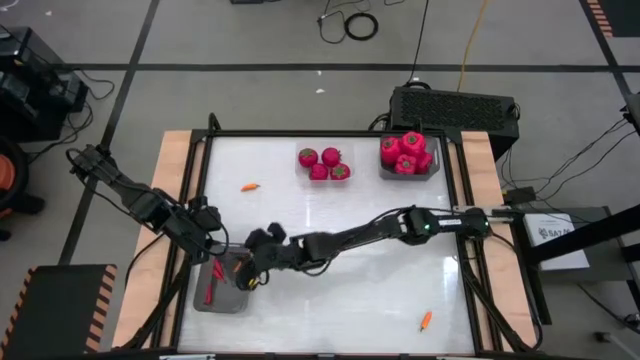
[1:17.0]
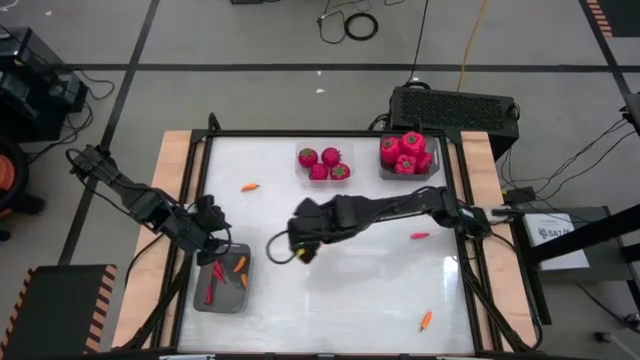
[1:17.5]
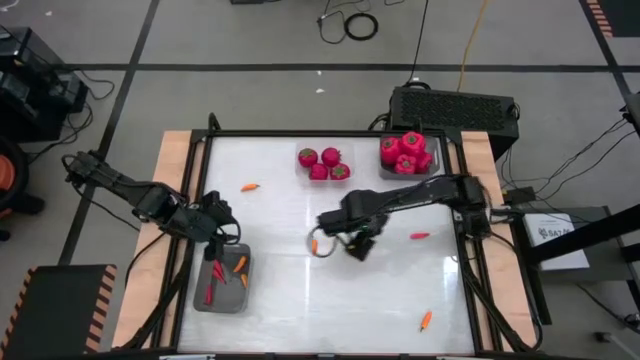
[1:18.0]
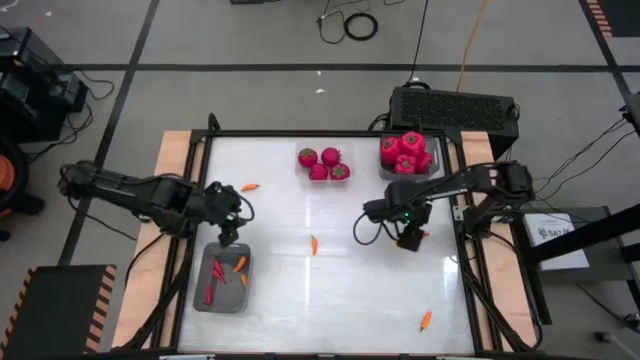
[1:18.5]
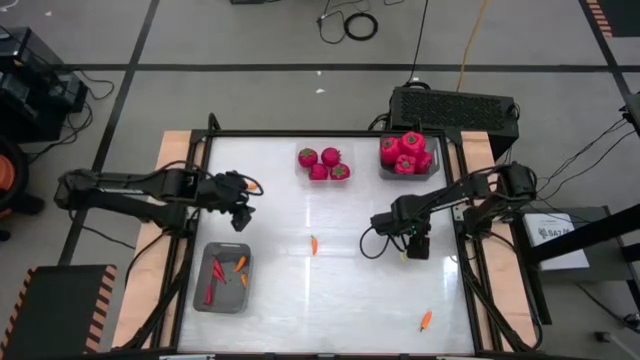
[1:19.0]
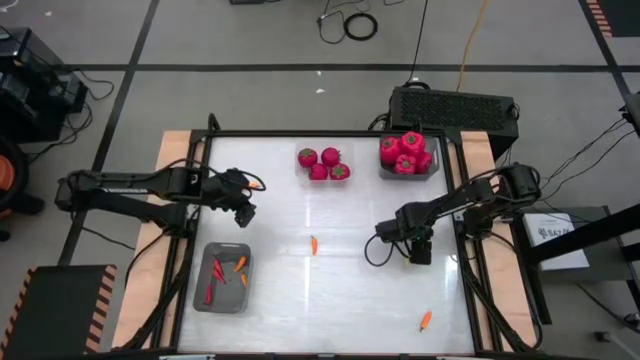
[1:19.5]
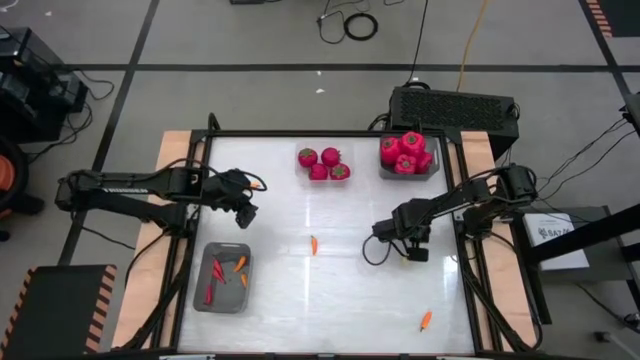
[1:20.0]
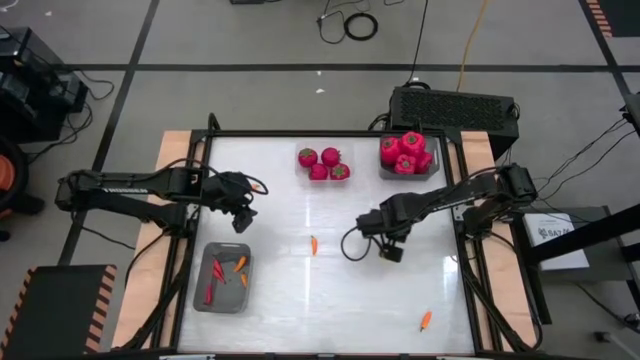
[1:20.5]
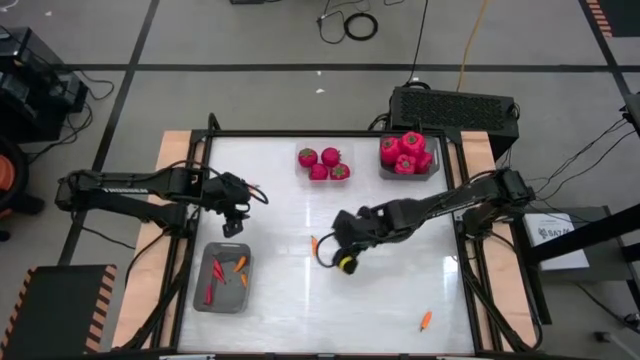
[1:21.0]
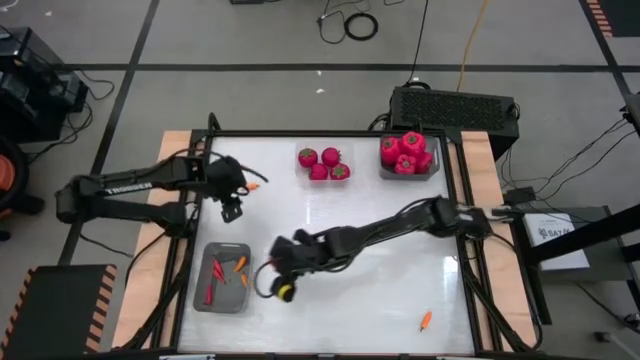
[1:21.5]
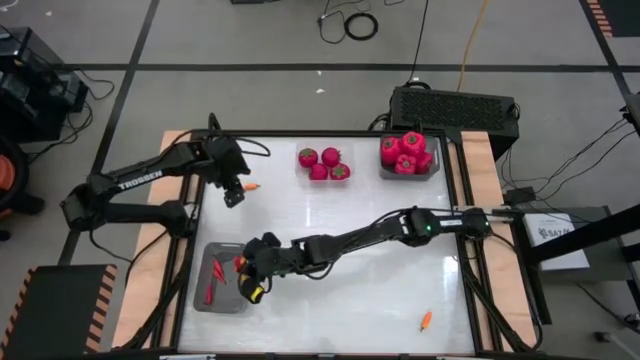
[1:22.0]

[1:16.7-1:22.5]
Task: Sort produce into baskets
Put the orange chili into the bottom gray bin

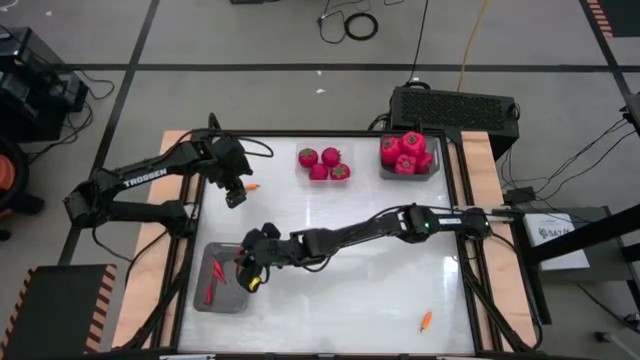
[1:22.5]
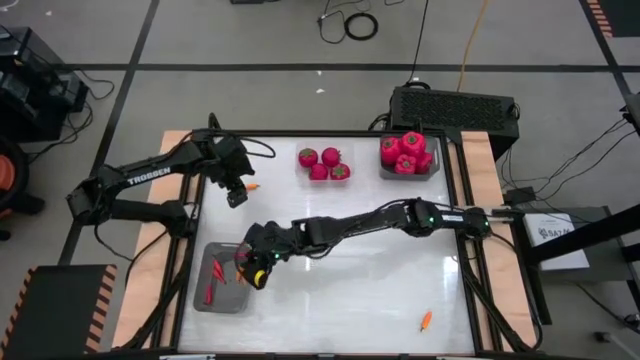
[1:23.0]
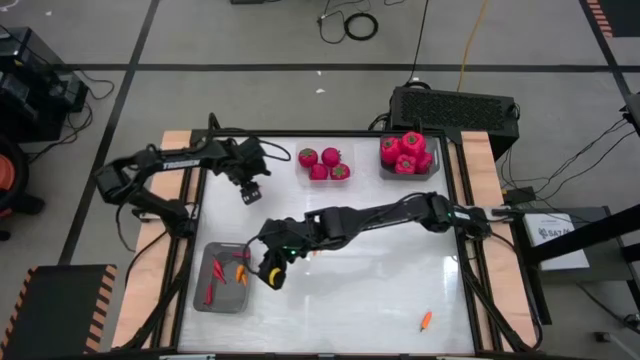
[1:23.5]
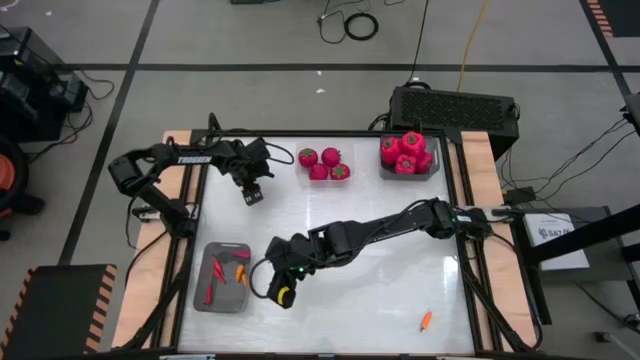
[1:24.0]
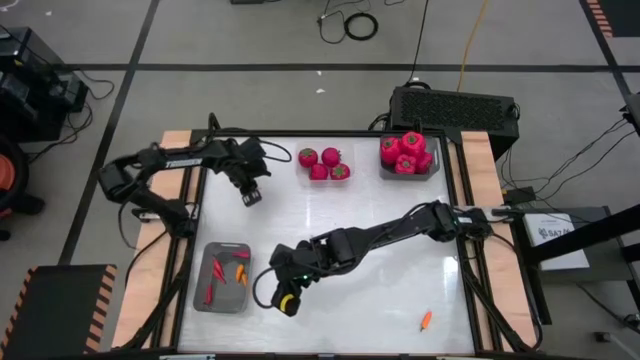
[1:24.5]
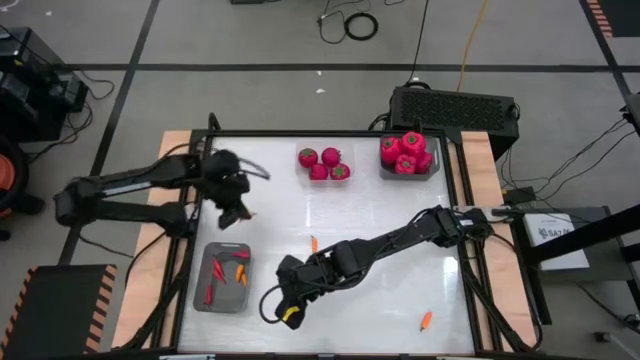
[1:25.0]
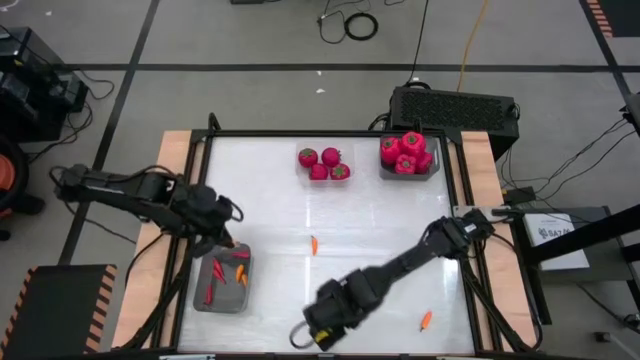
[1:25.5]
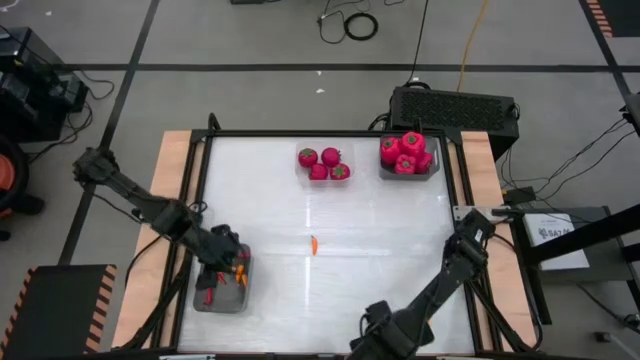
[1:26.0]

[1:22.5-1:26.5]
Put the yellow chili into the bottom gray bin

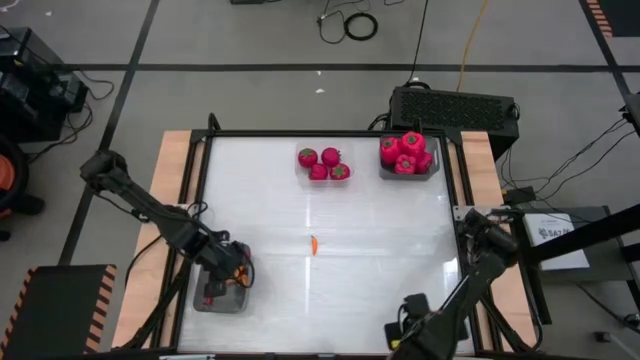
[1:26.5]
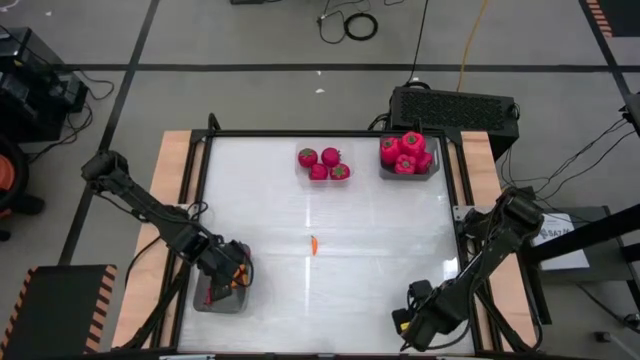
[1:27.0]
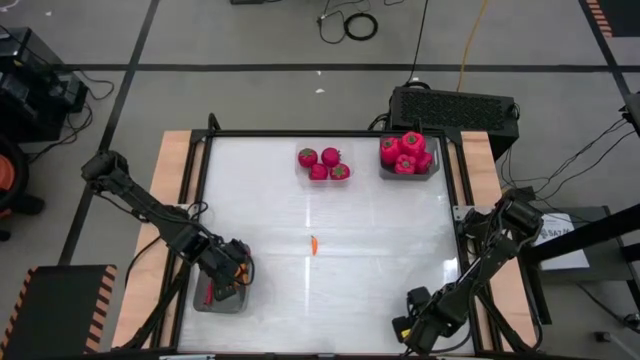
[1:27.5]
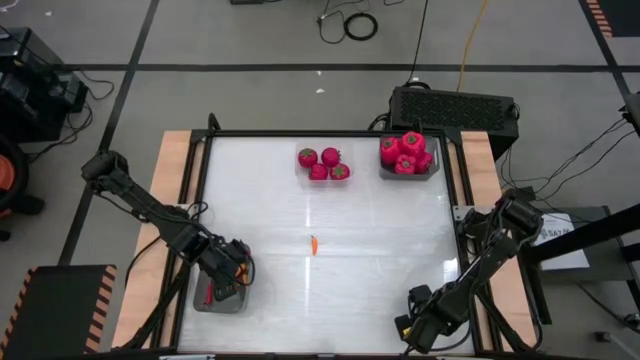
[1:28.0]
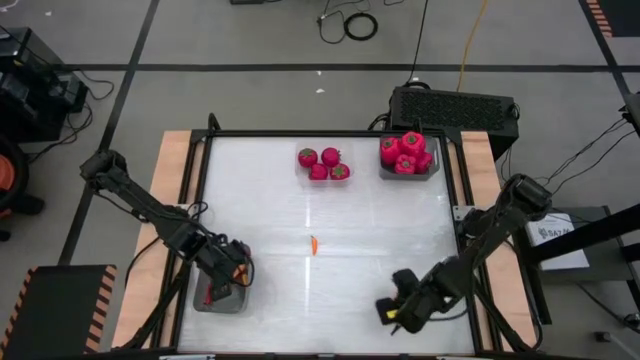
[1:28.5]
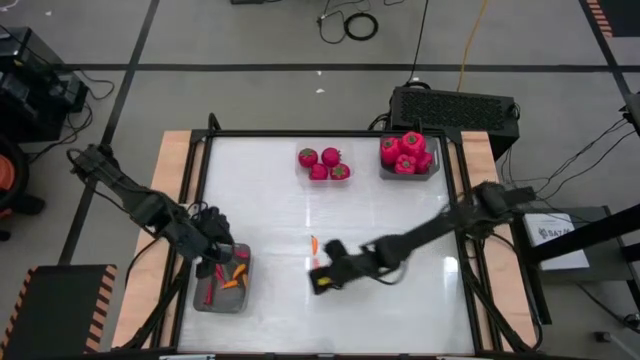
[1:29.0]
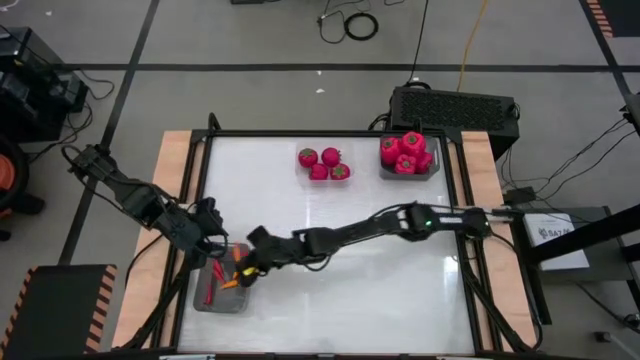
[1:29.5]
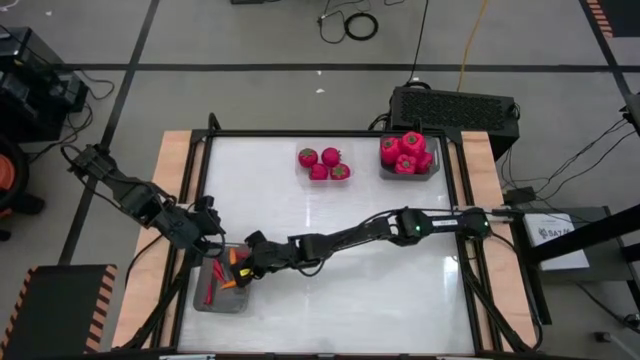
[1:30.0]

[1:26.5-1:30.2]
Put the yellow chili into the bottom gray bin

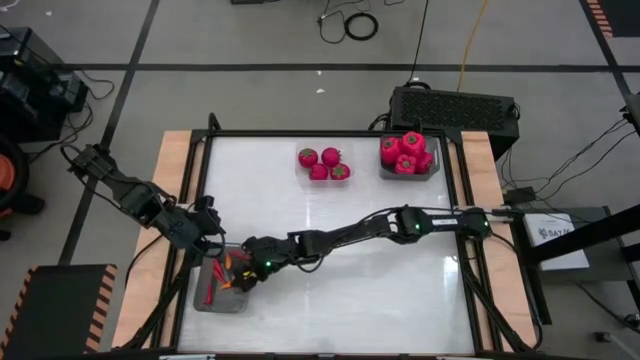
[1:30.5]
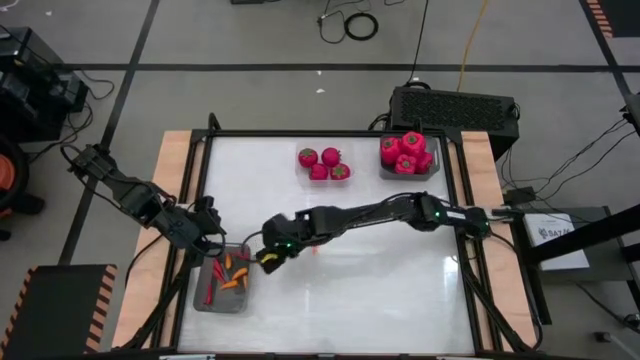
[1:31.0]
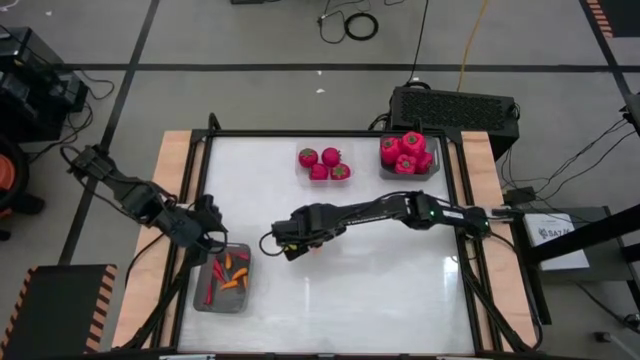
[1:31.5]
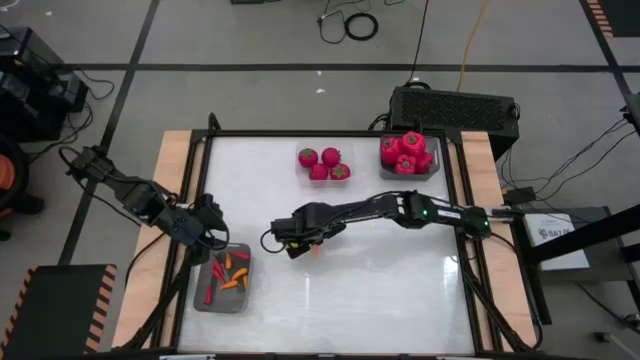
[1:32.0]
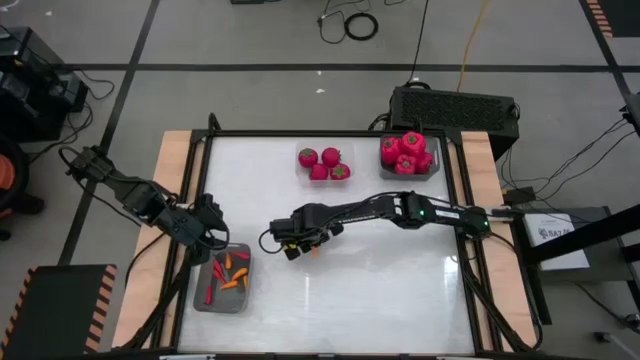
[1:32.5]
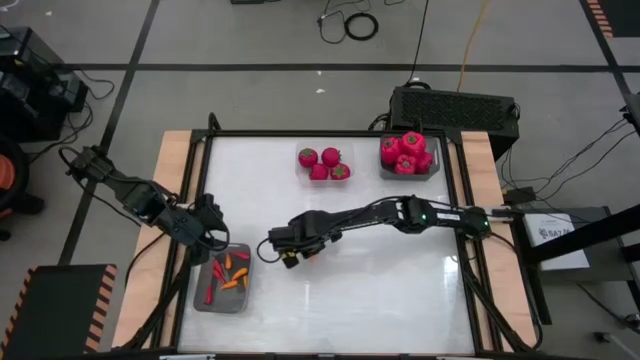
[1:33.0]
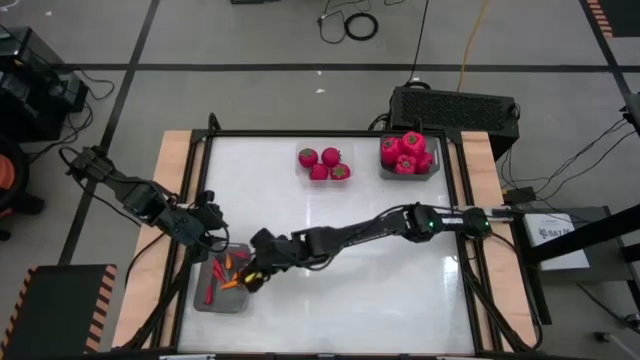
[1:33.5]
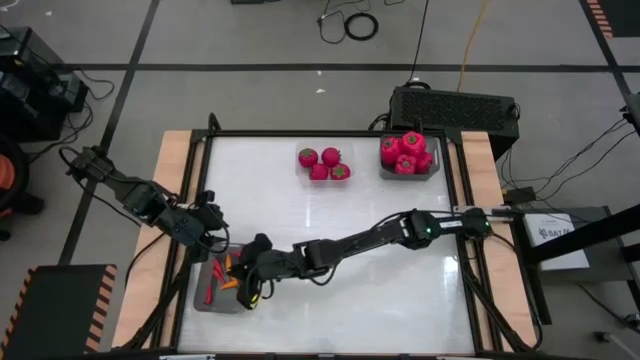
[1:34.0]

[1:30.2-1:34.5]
Put the yellow chili into the bottom gray bin

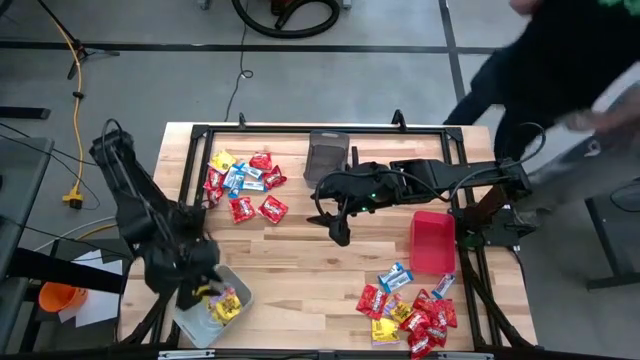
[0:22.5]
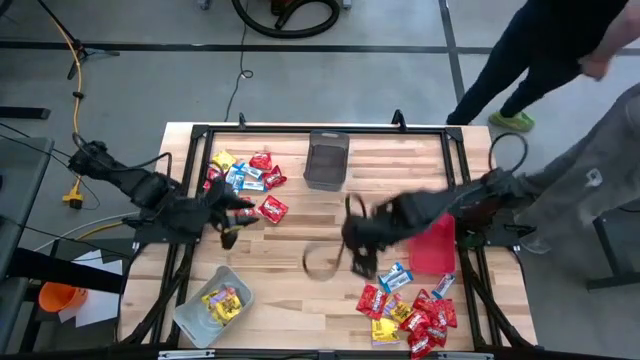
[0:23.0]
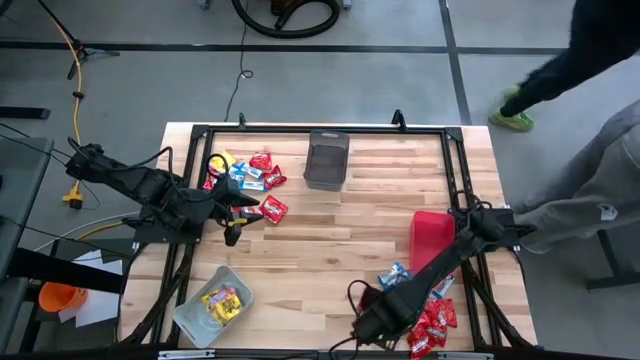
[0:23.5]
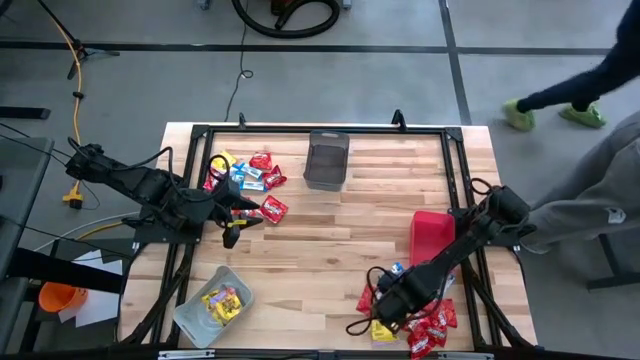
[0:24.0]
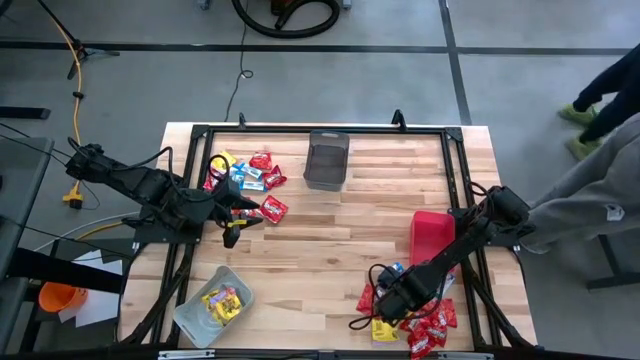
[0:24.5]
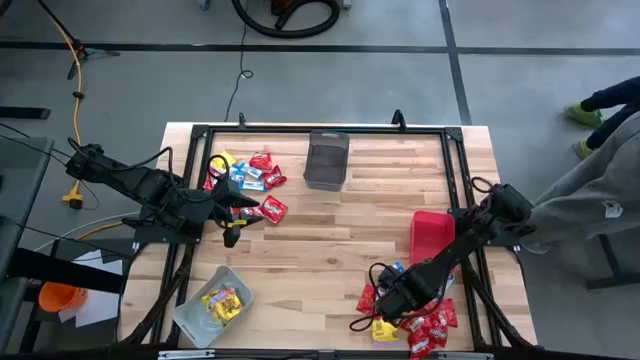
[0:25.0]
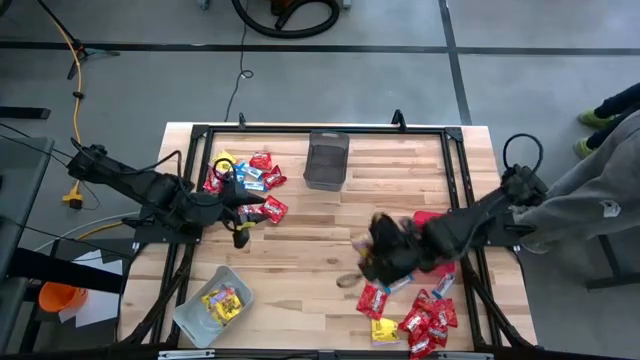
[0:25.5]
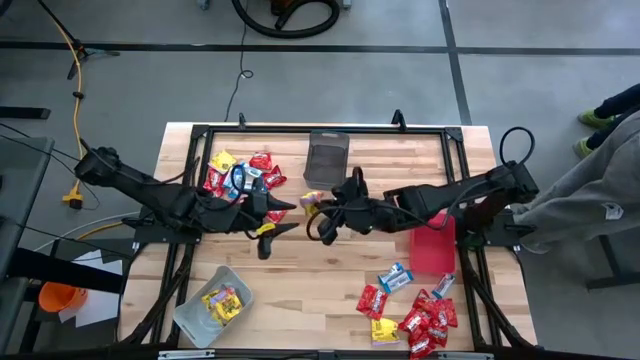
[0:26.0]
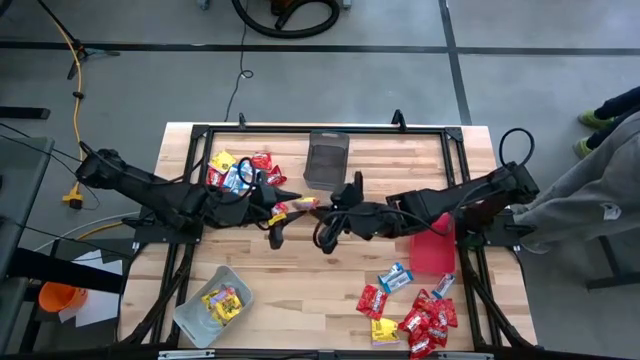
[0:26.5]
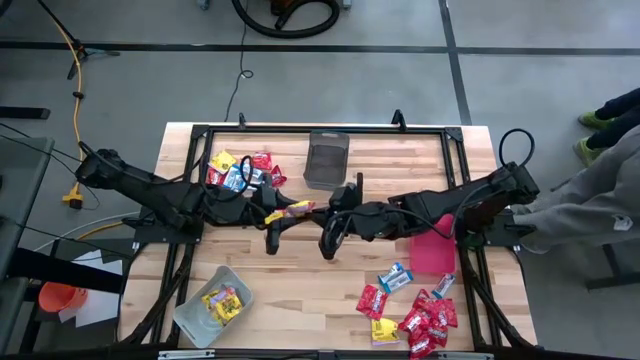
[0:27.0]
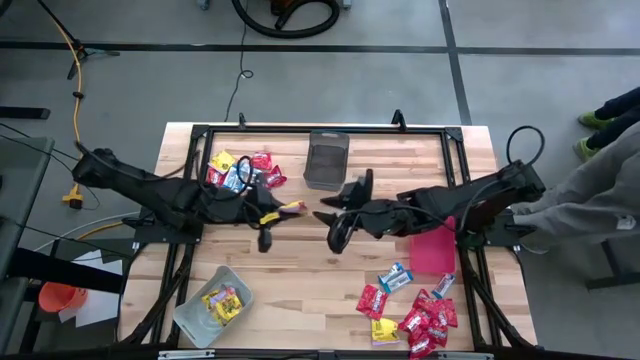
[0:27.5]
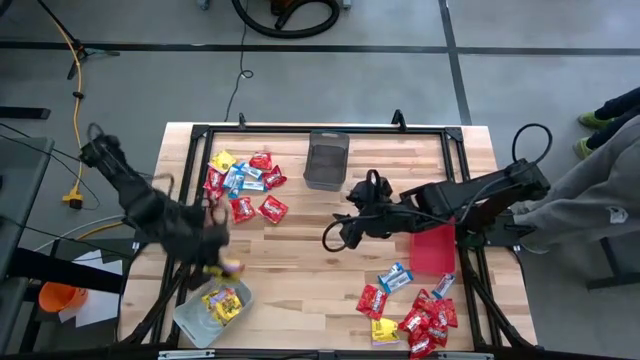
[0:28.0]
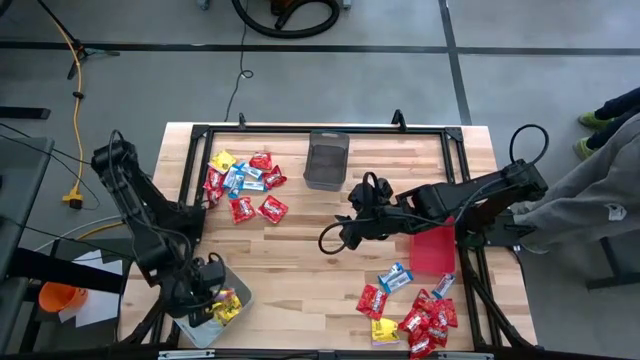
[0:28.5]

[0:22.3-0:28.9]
Task: Sort candy
Put the yellow candy pack into the gray bin
